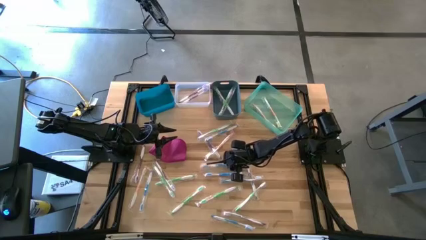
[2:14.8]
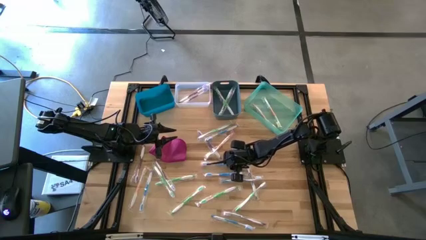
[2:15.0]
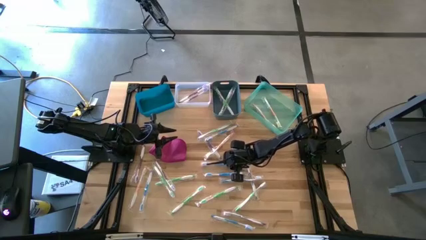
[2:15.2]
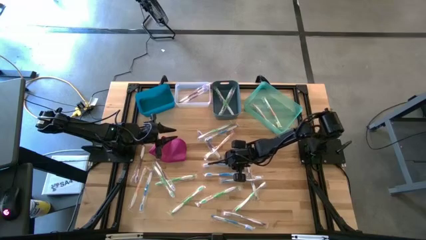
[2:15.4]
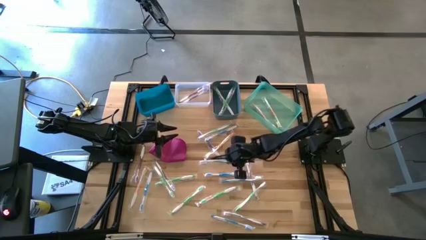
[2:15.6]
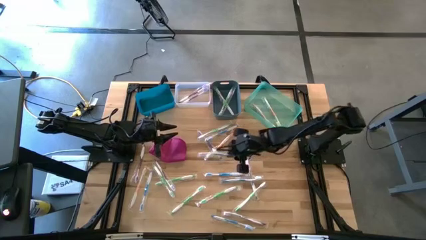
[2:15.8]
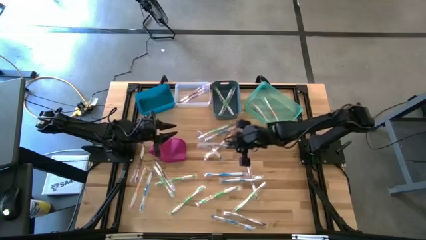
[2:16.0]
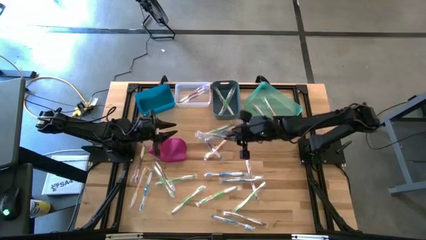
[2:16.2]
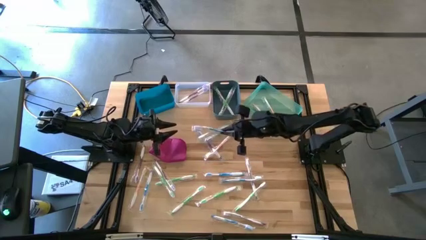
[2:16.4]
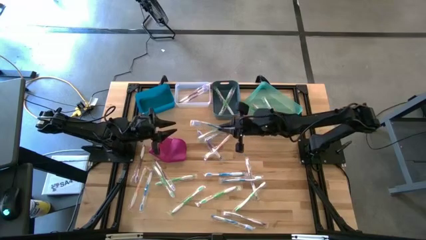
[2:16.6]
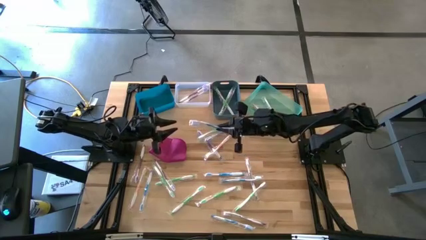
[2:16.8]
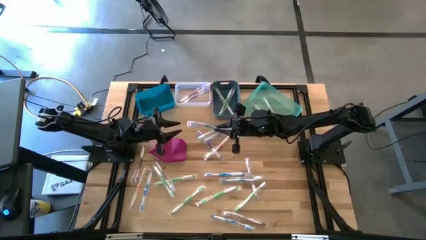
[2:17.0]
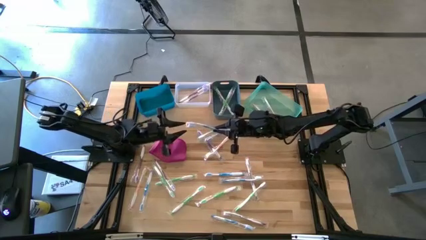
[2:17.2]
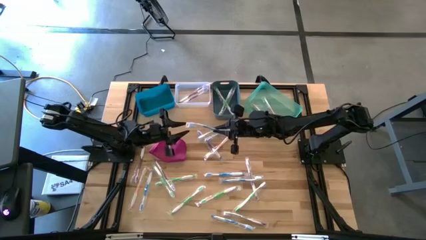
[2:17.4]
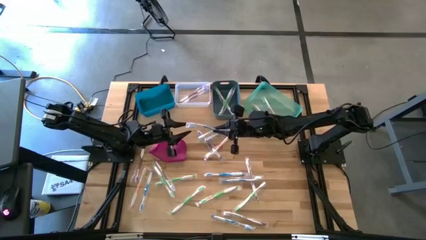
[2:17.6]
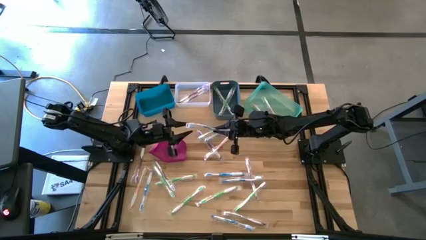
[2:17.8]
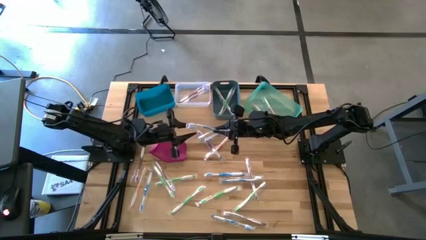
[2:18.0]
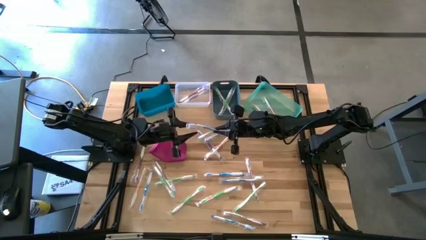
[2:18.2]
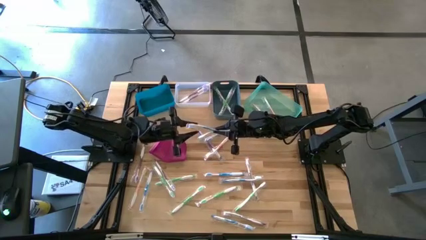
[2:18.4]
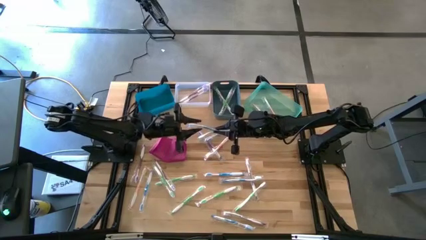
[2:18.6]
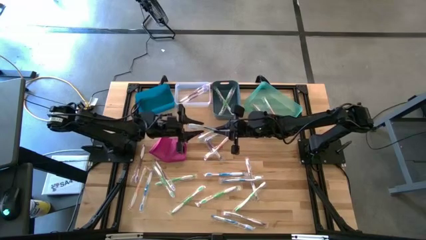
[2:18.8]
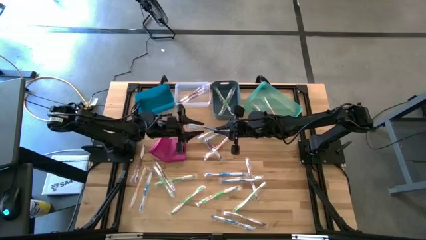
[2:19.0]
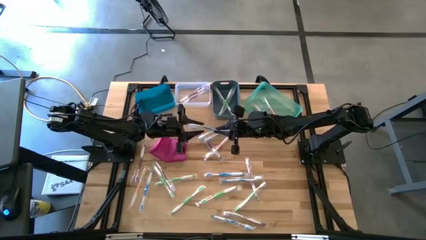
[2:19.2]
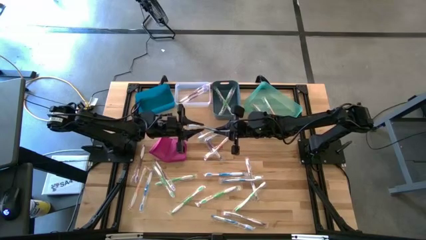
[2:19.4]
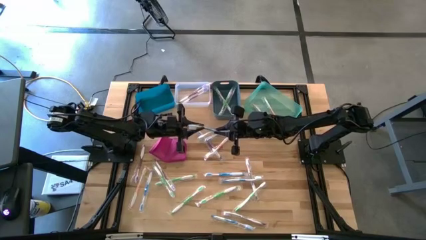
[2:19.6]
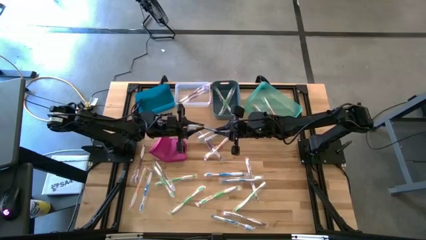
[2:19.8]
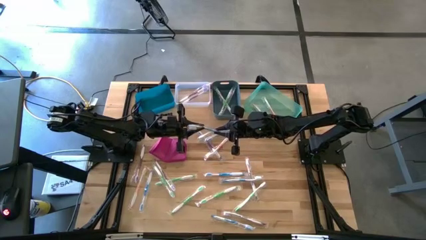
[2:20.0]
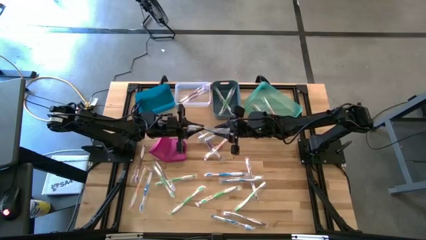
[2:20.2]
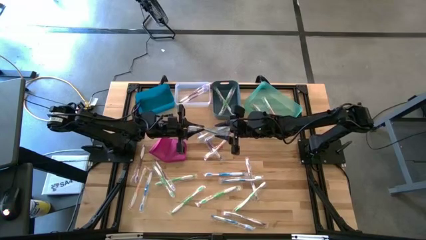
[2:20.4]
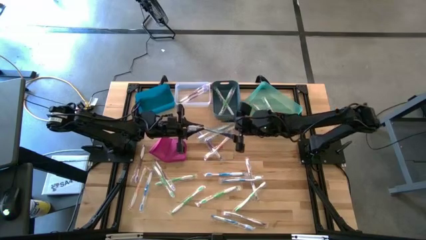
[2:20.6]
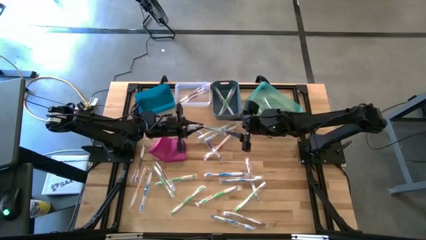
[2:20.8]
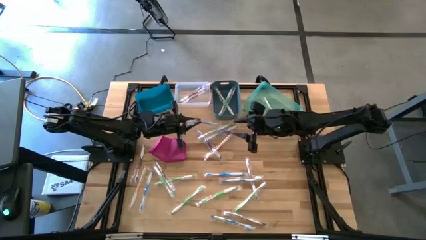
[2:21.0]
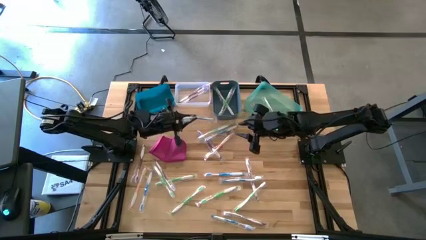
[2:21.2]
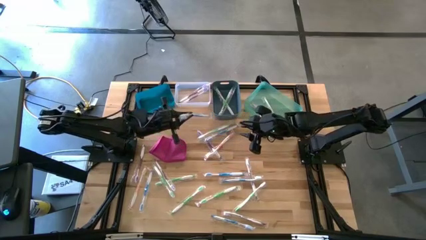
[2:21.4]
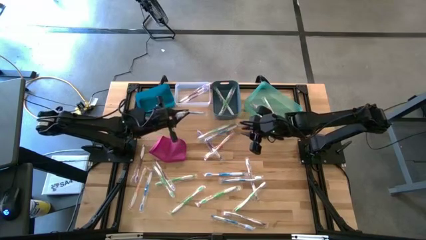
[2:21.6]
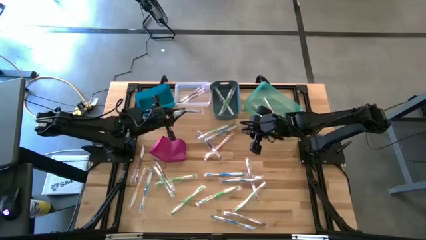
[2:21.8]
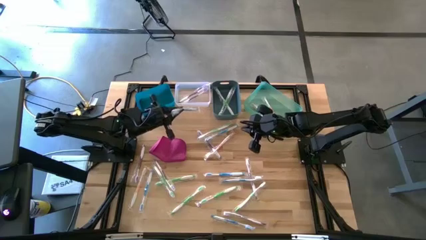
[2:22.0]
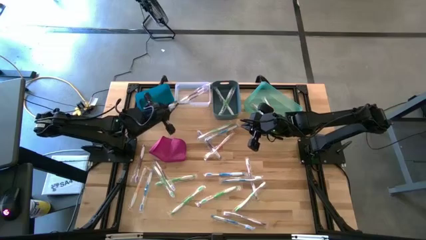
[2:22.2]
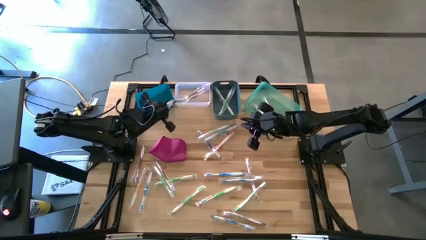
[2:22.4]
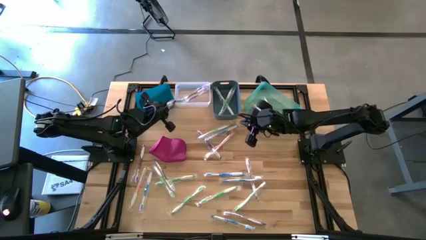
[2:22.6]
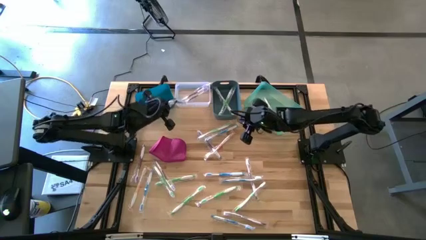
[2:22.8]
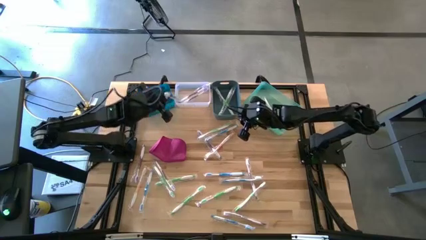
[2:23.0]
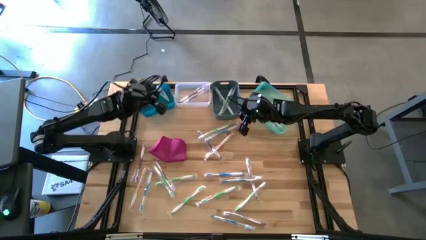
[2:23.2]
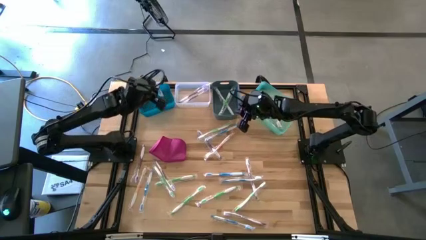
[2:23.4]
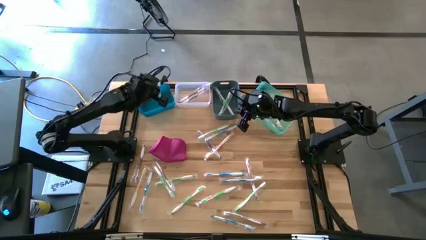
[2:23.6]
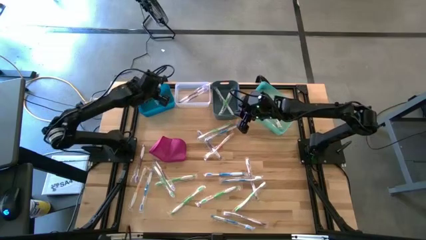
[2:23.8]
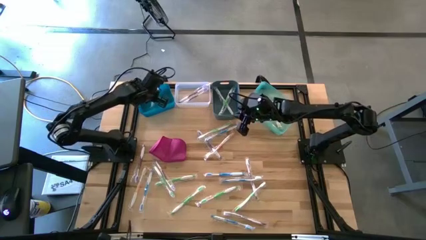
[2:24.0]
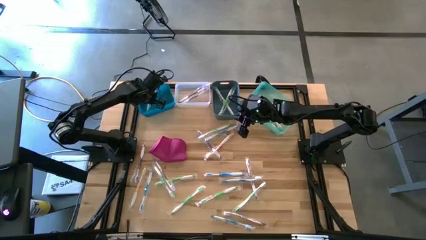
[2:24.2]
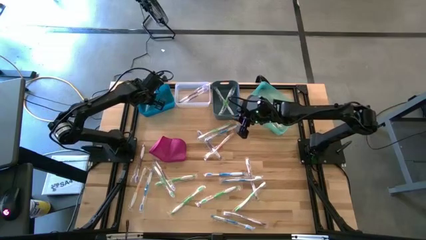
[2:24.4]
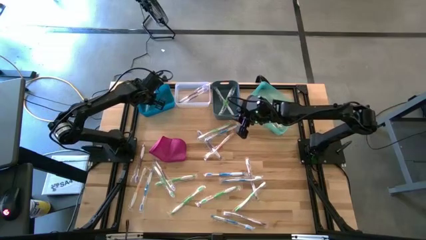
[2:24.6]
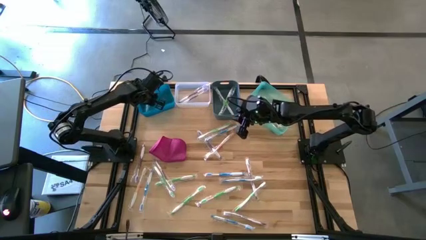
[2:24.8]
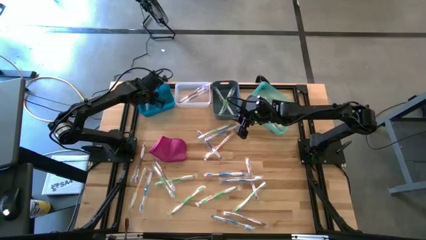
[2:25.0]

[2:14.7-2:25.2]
Task: Pick & Place Toothbrushes
Put the blue toothbrush into the blue bin

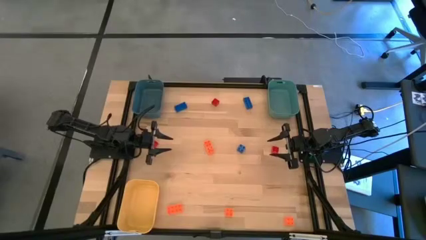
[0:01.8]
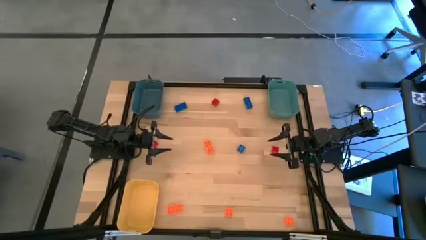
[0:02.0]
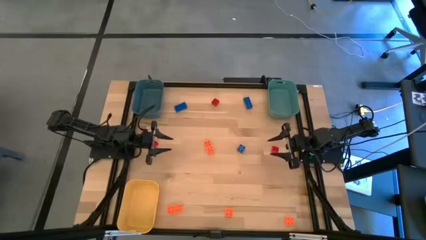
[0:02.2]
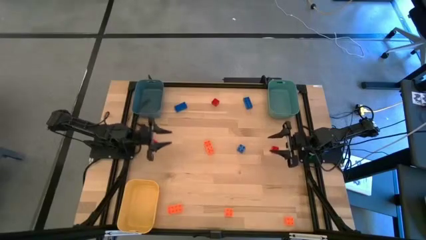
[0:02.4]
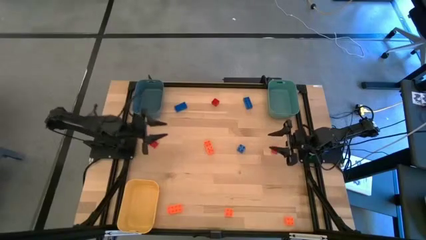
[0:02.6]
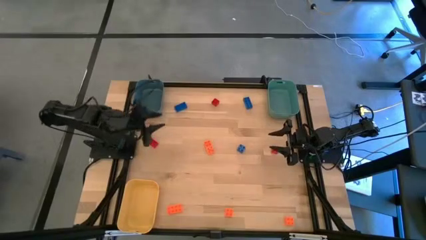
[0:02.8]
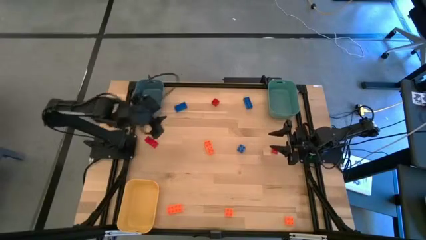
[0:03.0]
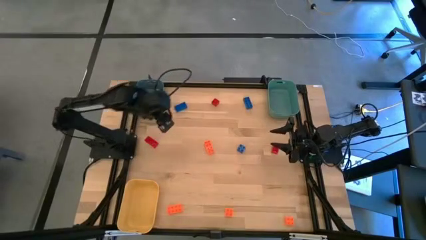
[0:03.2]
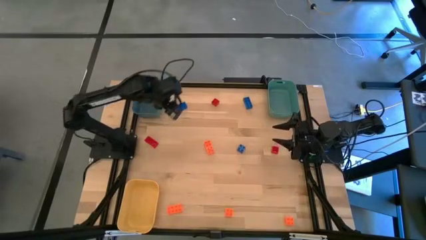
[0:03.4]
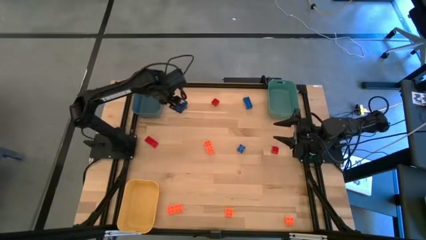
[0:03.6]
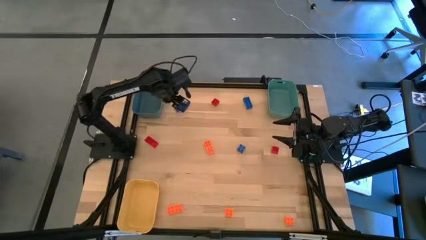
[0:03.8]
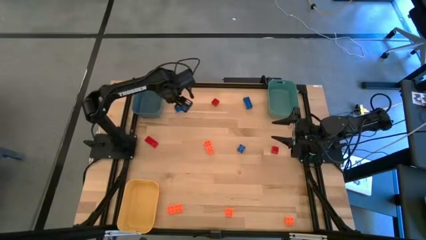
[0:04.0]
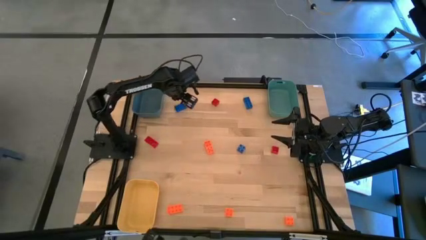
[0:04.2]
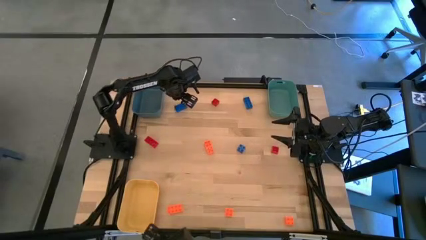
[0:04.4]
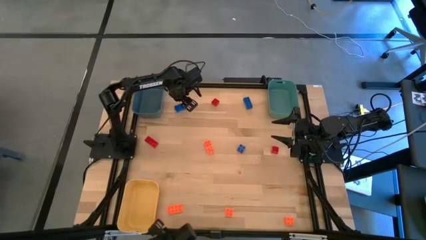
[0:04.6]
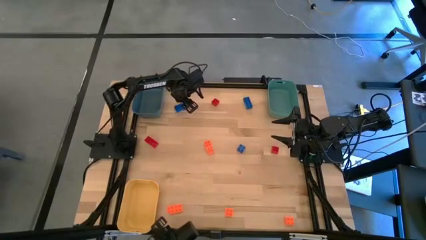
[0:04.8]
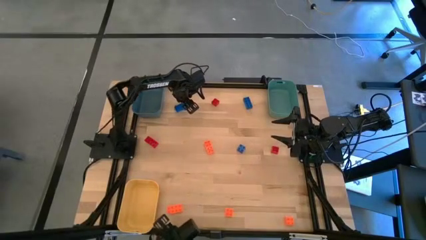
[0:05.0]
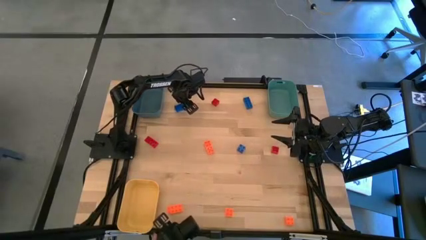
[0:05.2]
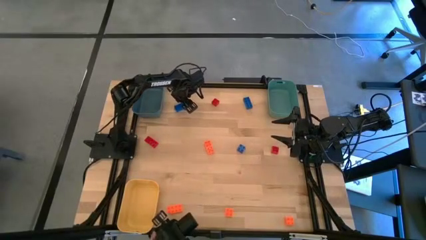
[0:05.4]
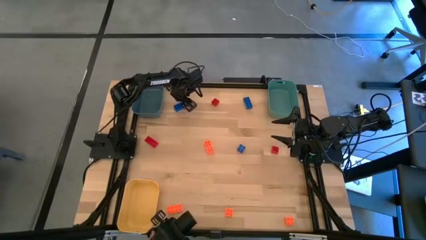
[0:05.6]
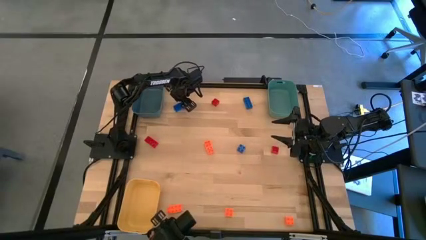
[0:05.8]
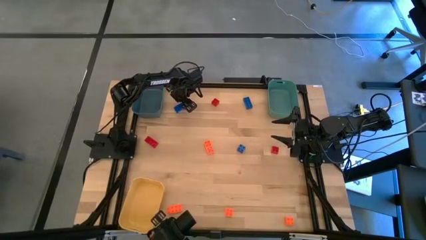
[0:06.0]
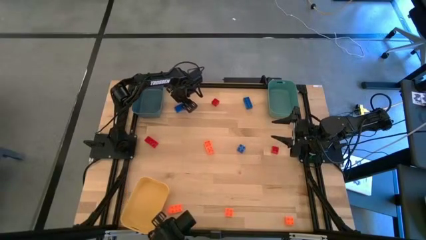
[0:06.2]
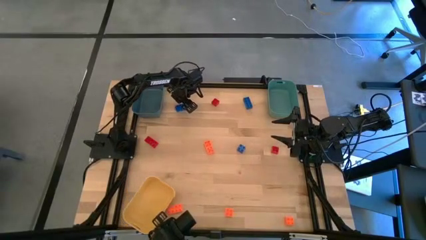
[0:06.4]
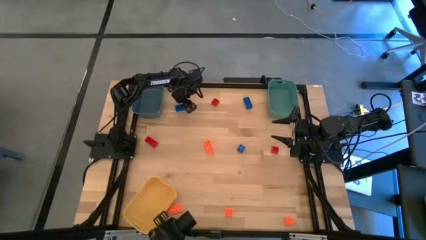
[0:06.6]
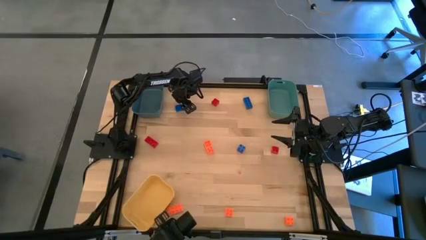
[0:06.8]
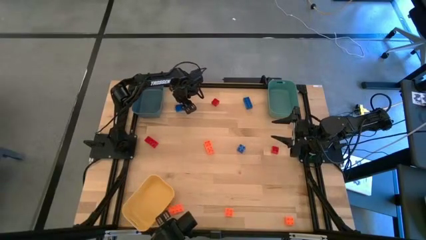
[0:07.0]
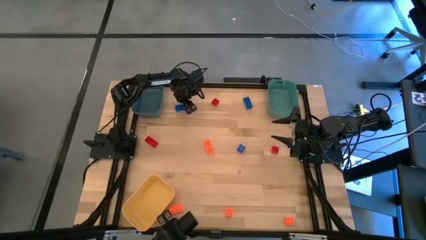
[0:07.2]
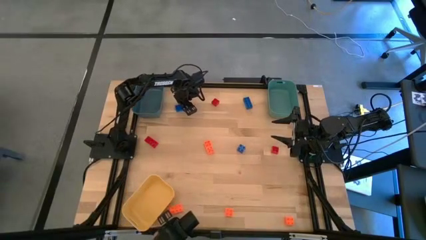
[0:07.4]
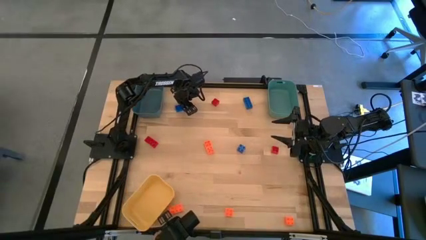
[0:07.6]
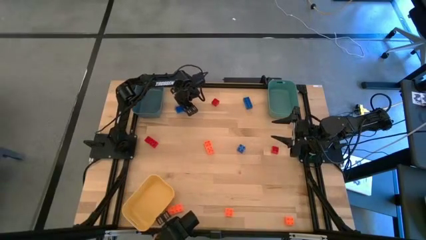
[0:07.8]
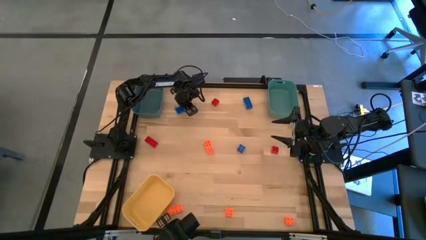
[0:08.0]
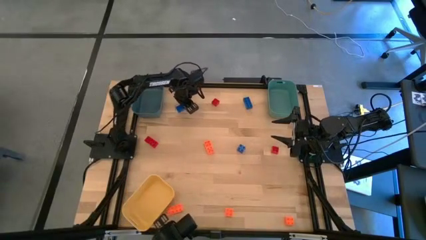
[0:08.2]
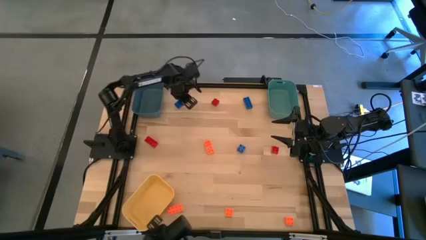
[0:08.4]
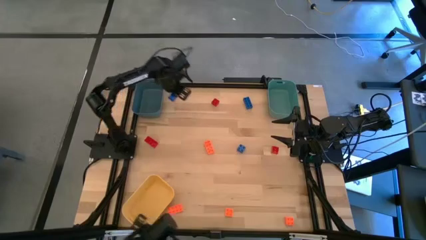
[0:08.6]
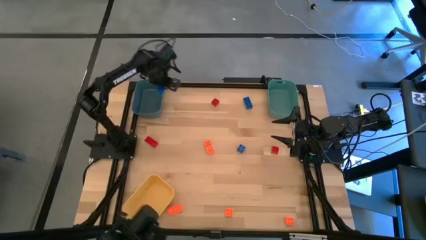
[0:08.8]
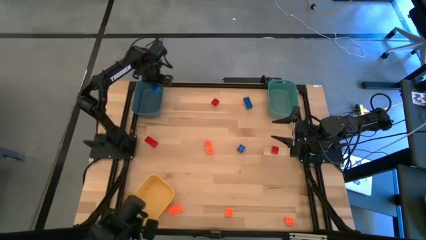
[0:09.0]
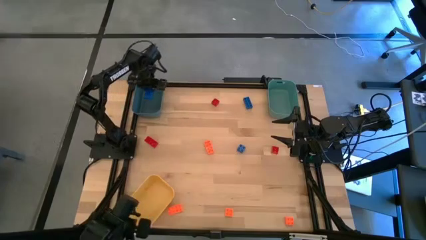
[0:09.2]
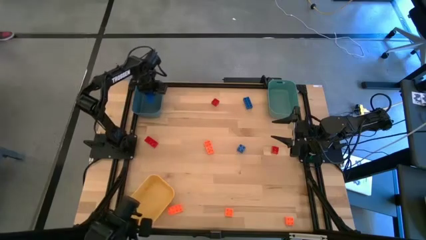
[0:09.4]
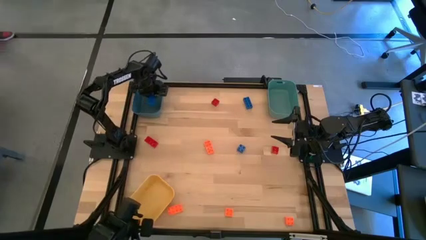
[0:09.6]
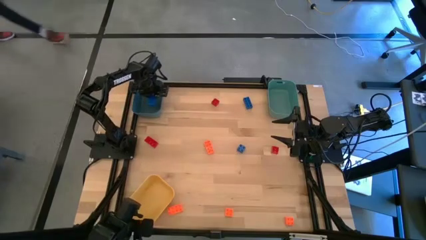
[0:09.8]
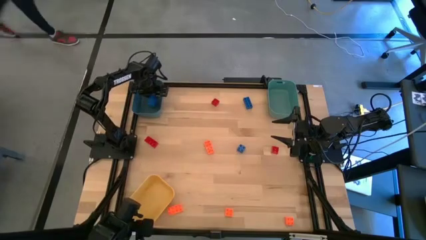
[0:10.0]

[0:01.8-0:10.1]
Task: Sort & place blocks by color
Put the left blue game piece into the blue bin
